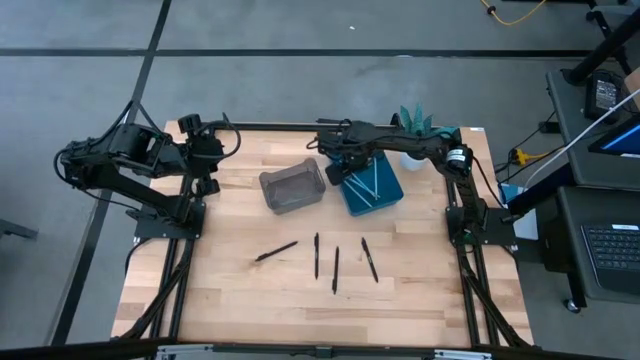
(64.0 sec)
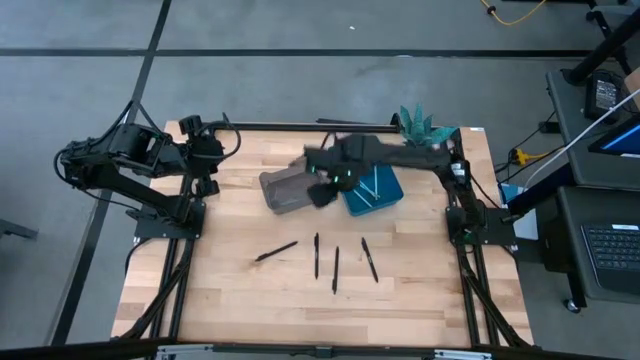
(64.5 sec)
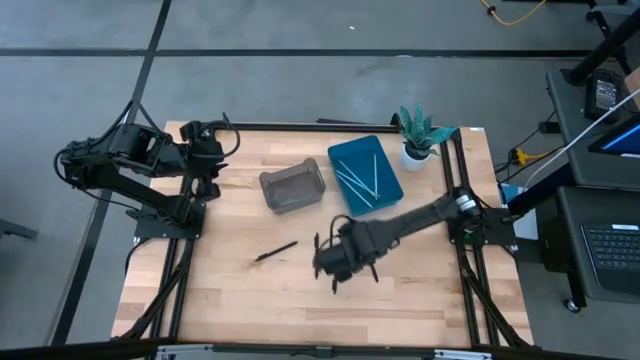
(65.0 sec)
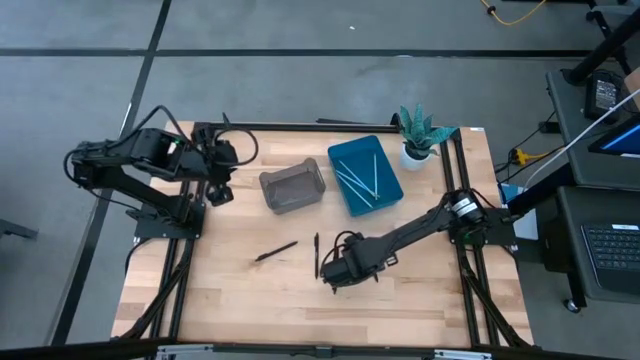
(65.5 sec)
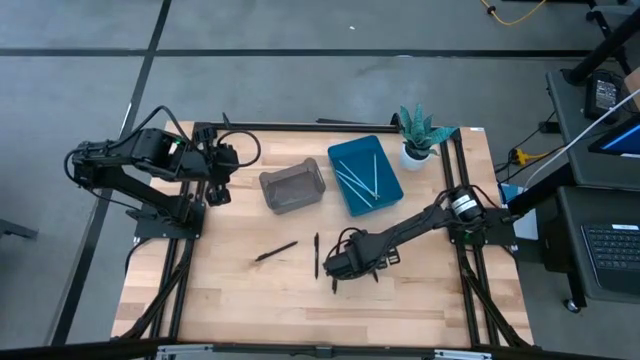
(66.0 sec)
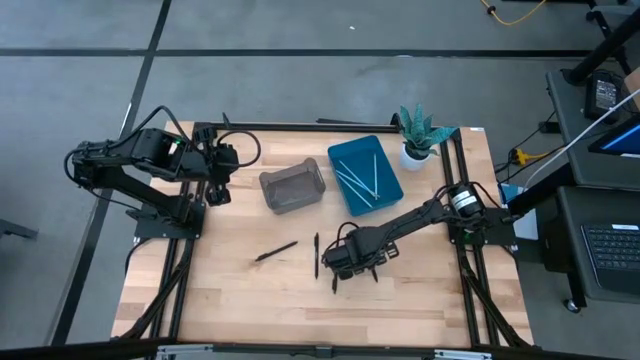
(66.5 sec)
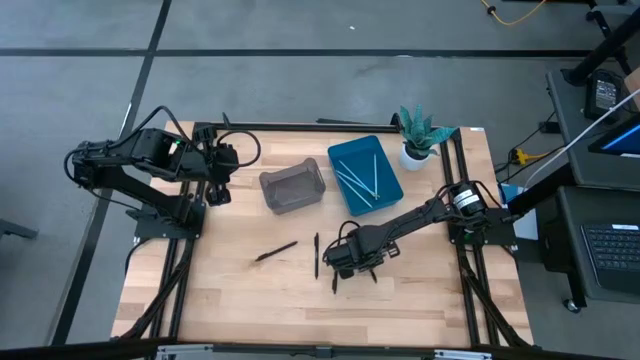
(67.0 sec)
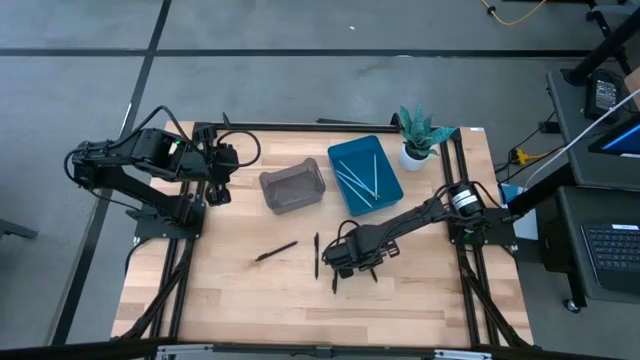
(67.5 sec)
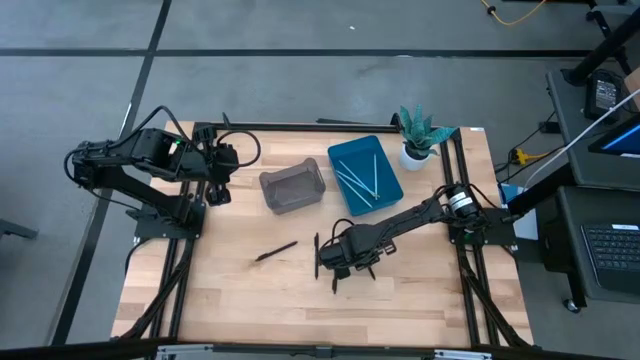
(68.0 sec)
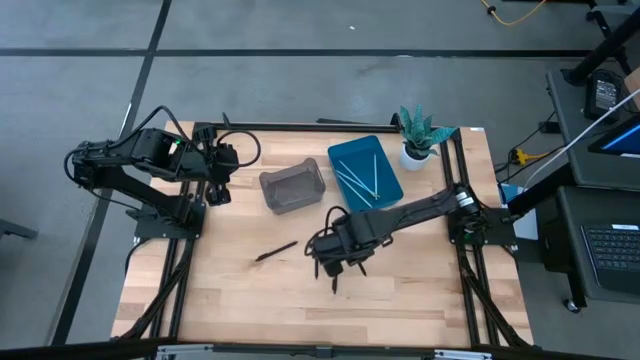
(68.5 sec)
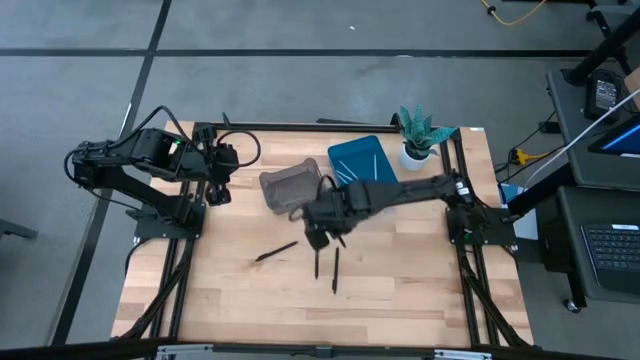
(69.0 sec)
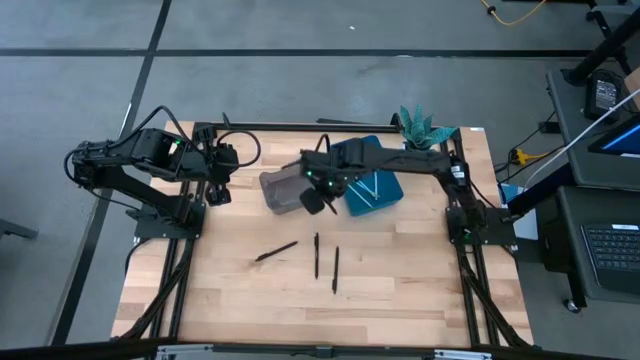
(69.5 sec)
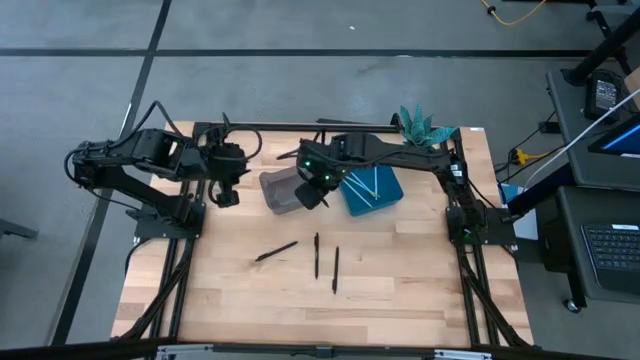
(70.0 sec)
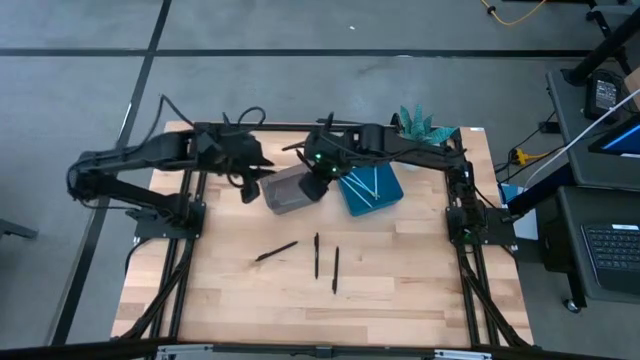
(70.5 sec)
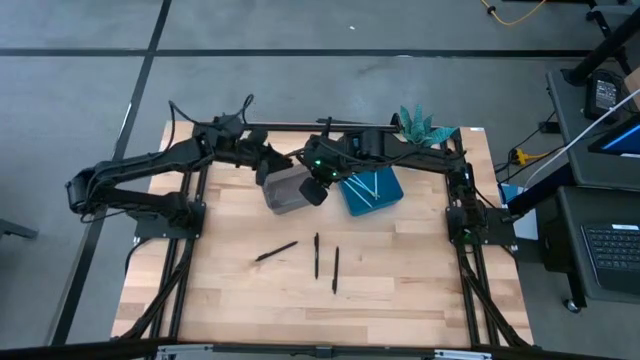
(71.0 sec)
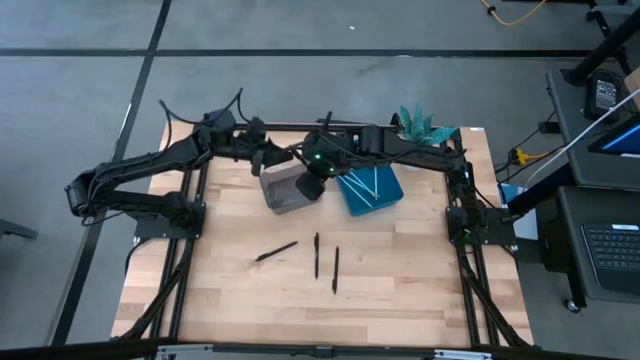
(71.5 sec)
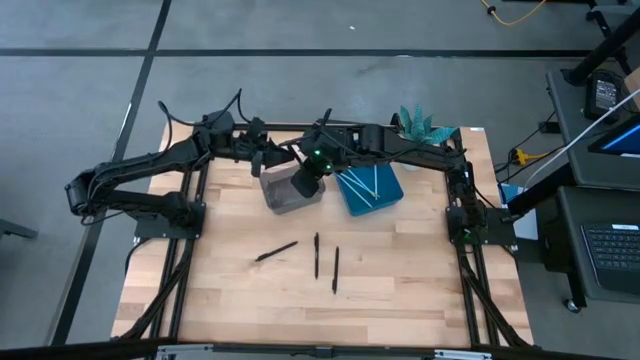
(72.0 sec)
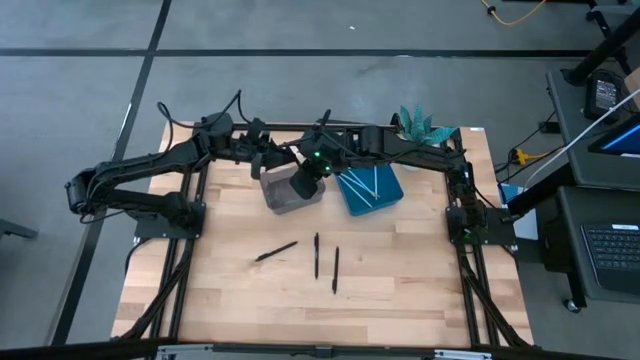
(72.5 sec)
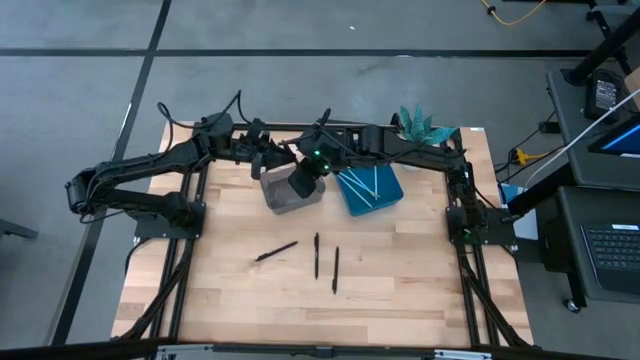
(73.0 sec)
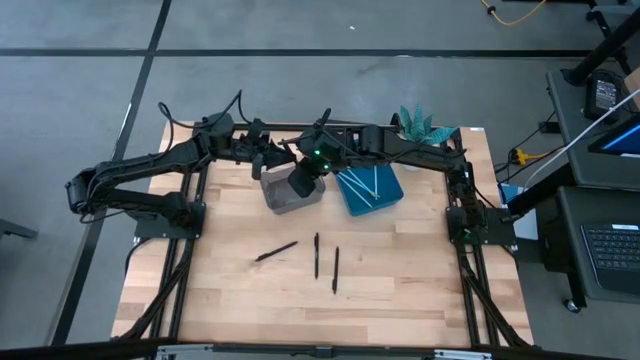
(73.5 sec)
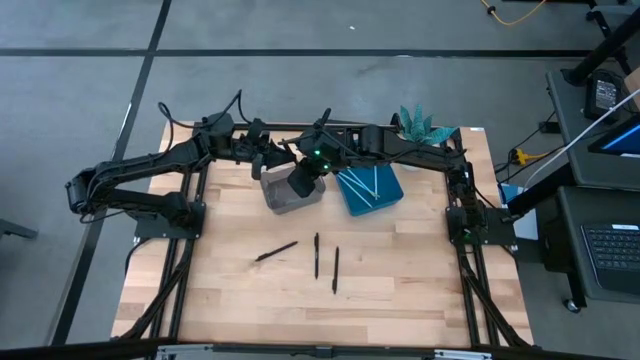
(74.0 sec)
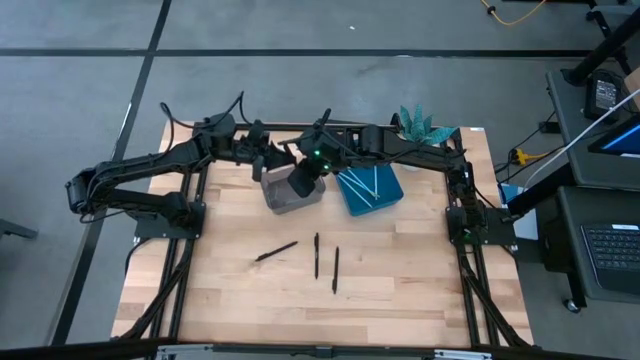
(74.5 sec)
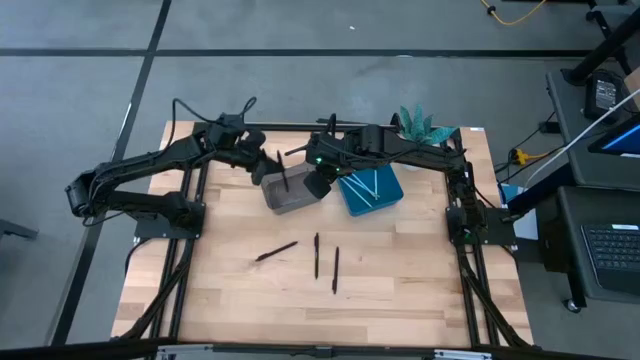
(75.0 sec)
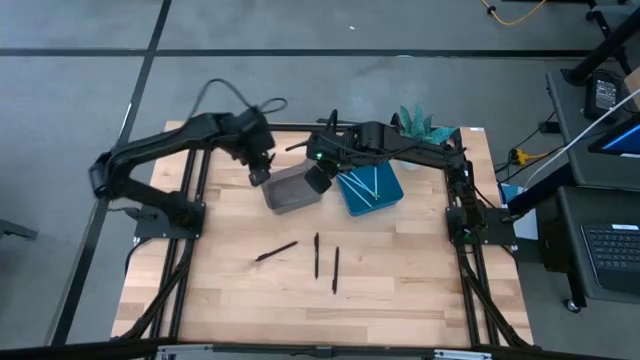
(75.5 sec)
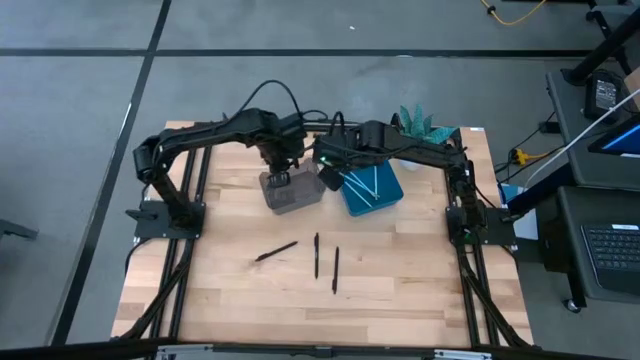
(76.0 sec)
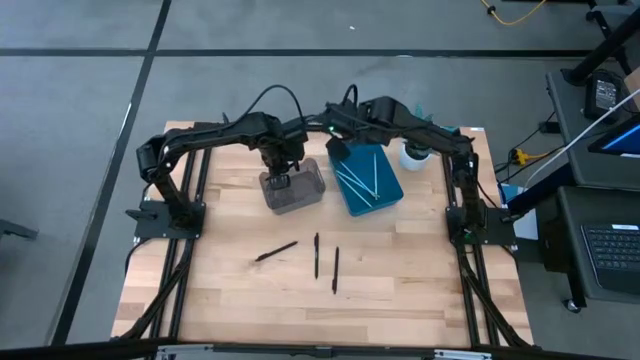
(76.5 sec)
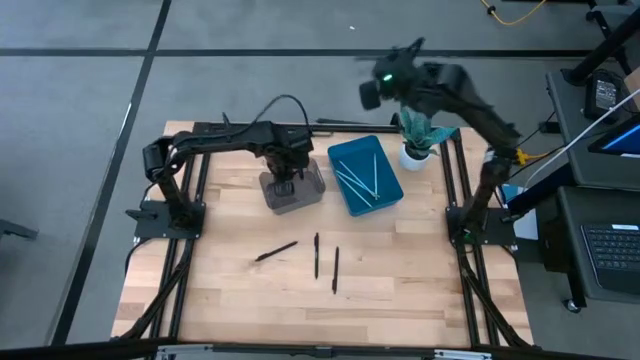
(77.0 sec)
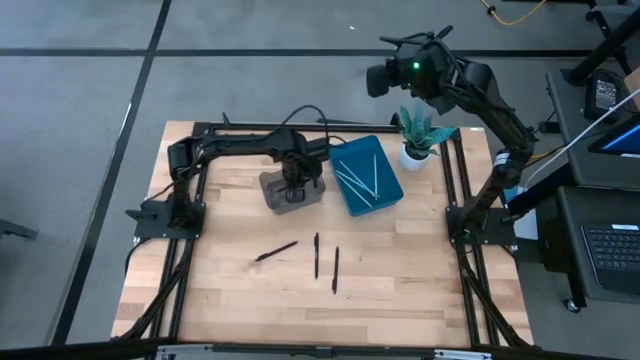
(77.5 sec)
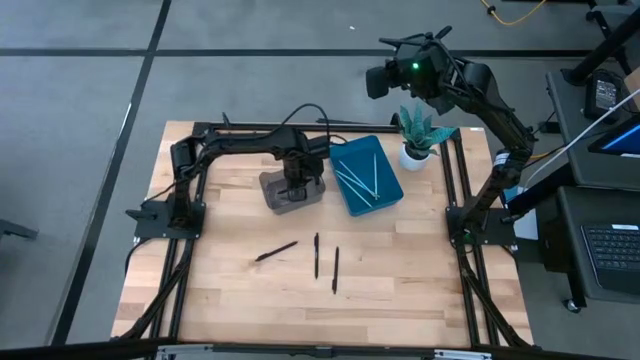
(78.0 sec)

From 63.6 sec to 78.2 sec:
Task: Sort pens & pencils
Put the right black pen into the black bin

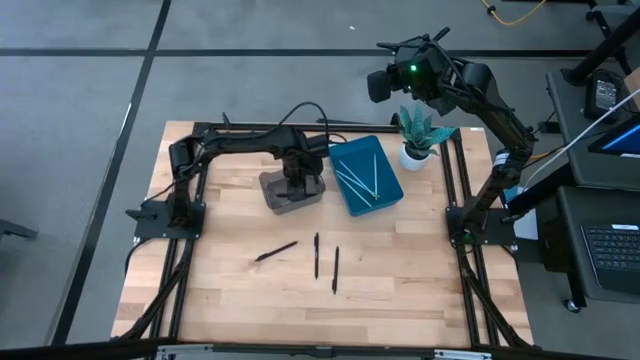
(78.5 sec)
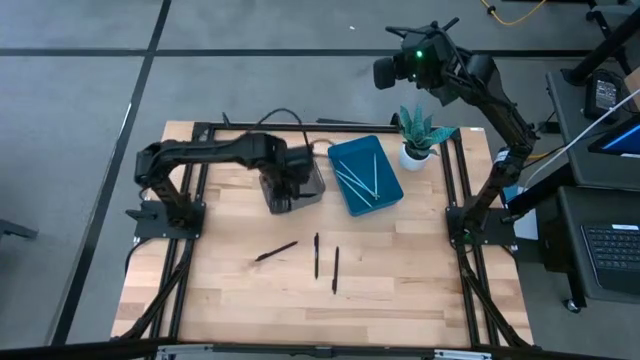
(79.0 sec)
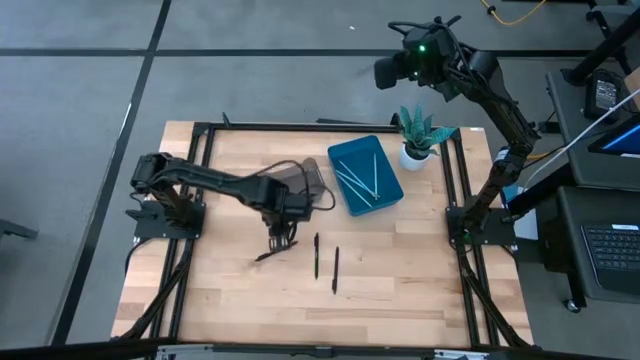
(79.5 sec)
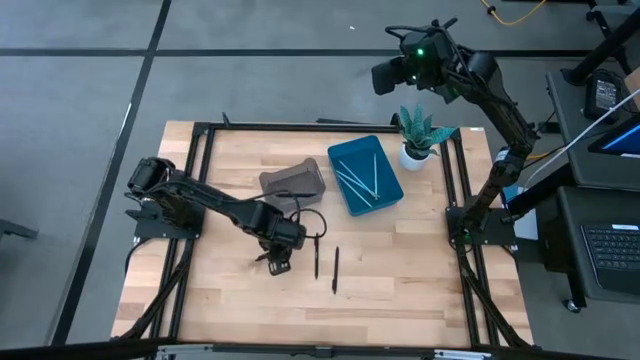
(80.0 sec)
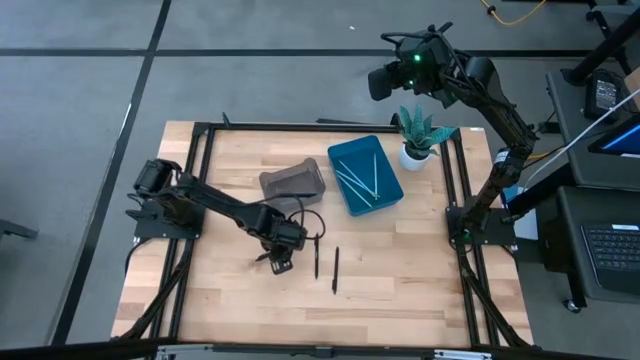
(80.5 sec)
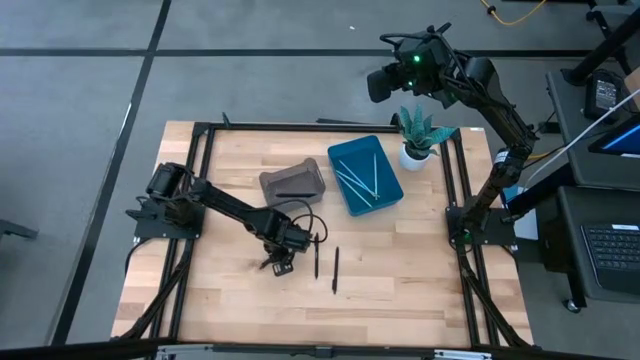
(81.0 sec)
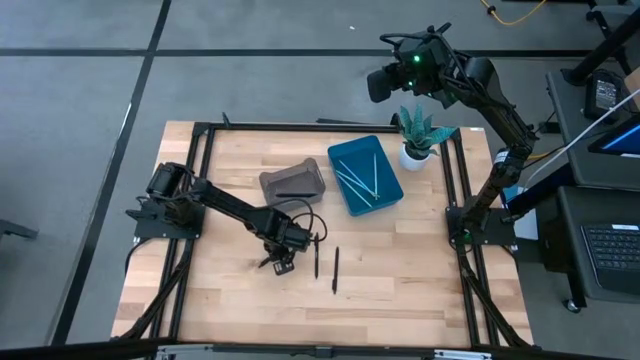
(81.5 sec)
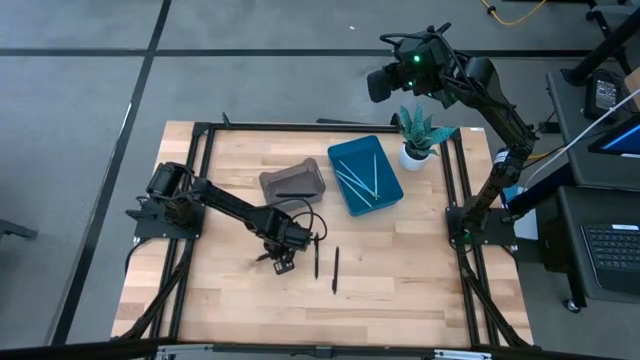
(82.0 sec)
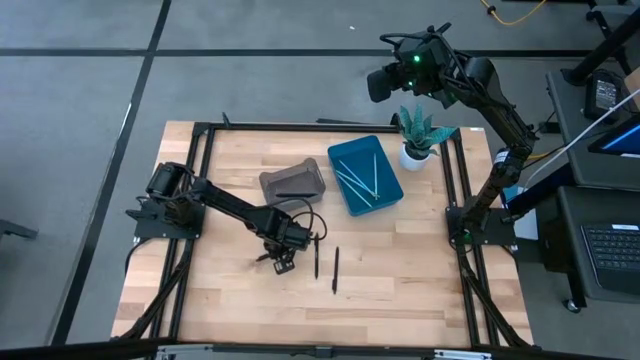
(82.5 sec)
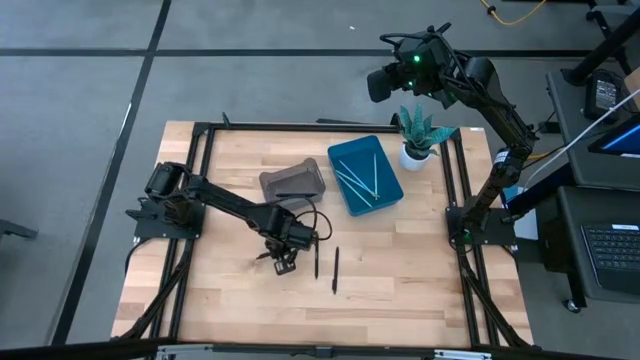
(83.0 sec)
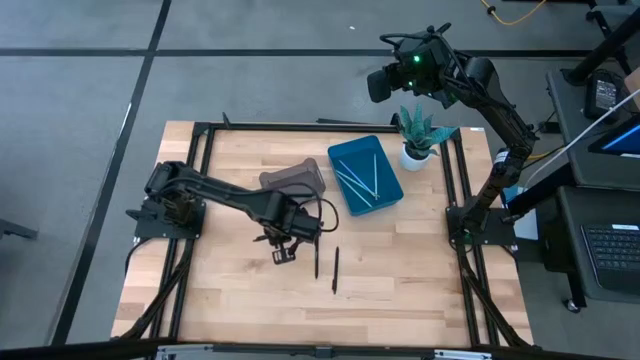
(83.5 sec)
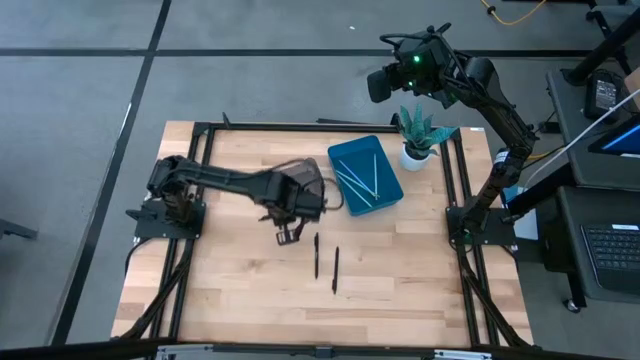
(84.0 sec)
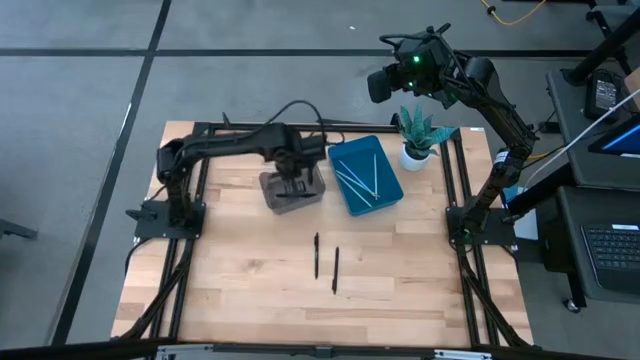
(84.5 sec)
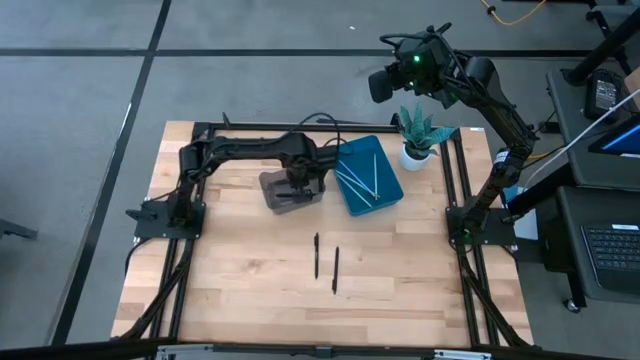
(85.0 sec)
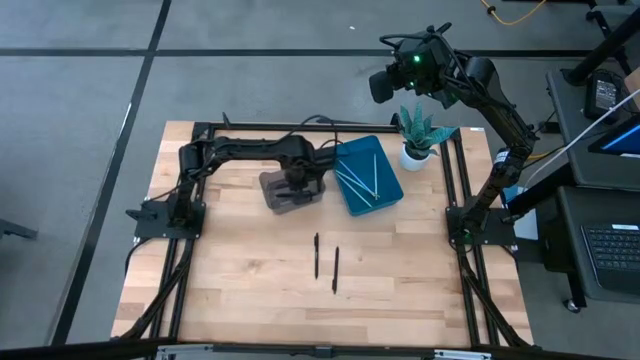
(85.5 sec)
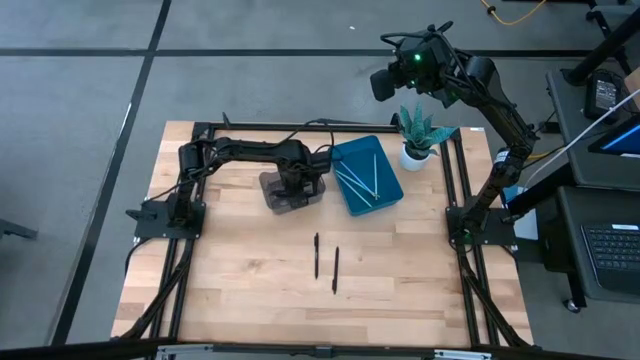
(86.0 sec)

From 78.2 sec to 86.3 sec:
Put the left black pen into the black bin
